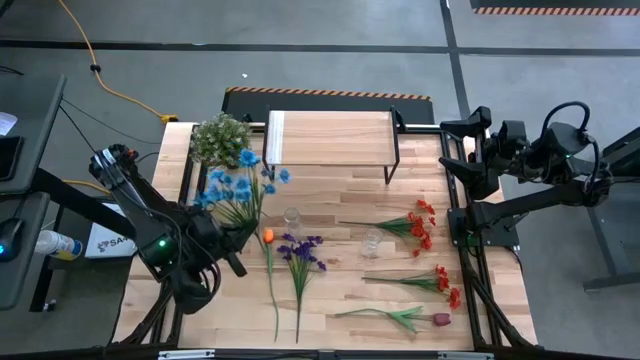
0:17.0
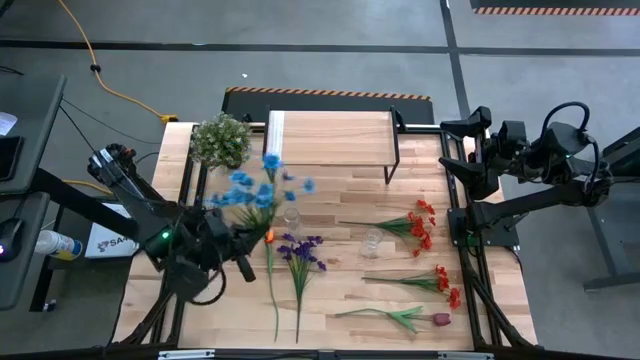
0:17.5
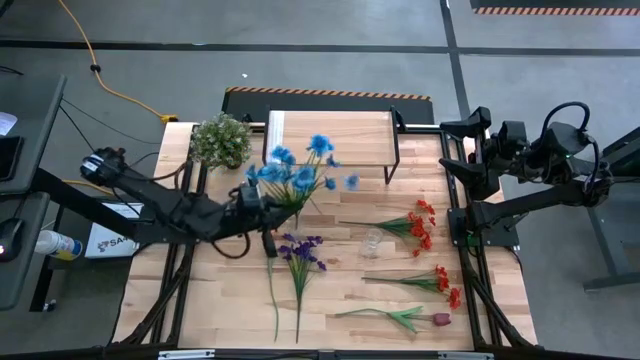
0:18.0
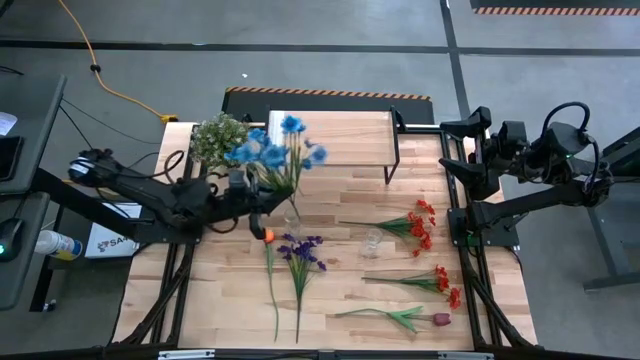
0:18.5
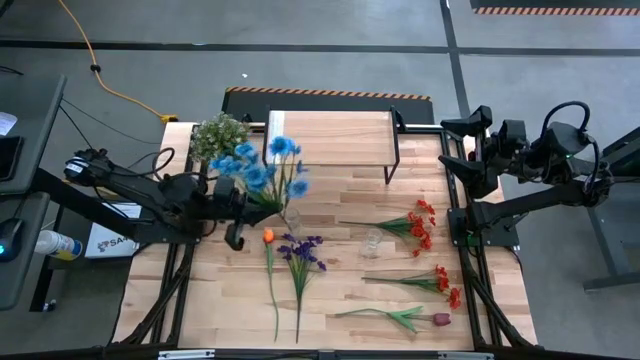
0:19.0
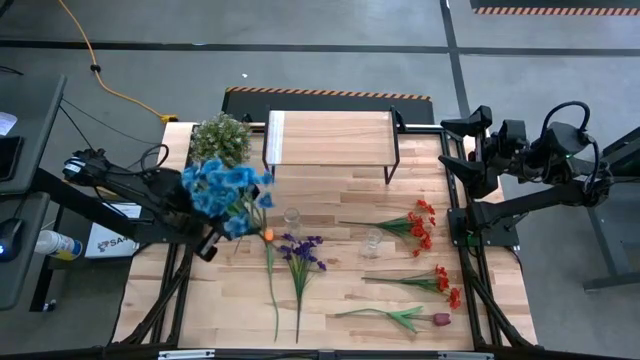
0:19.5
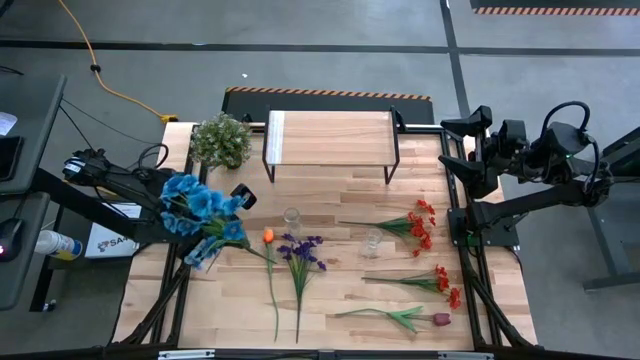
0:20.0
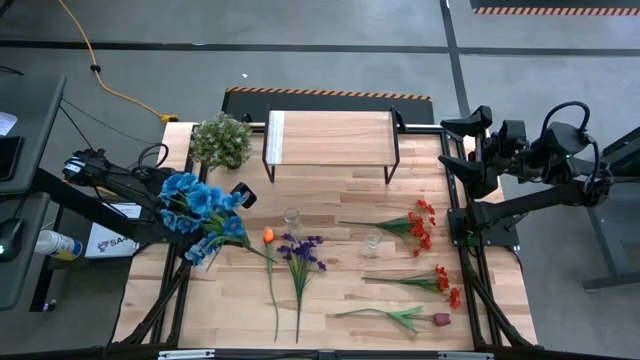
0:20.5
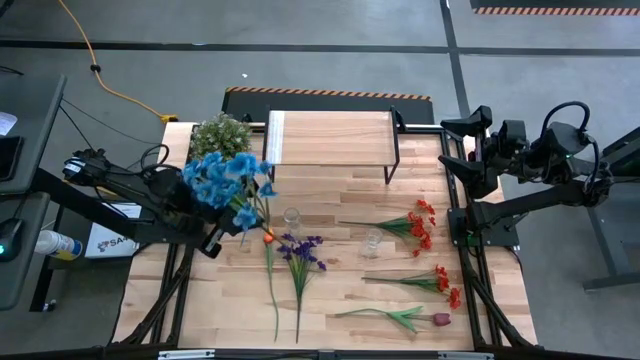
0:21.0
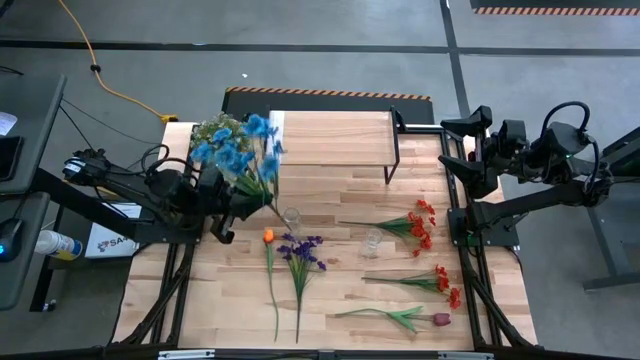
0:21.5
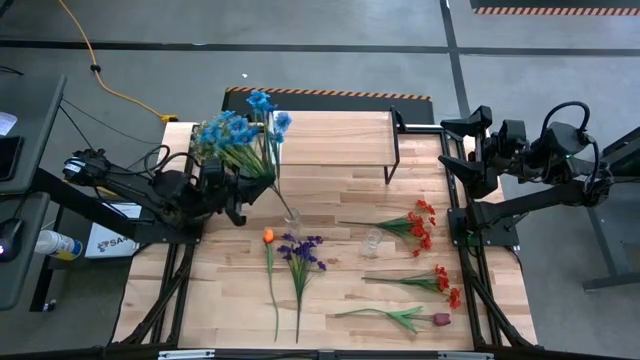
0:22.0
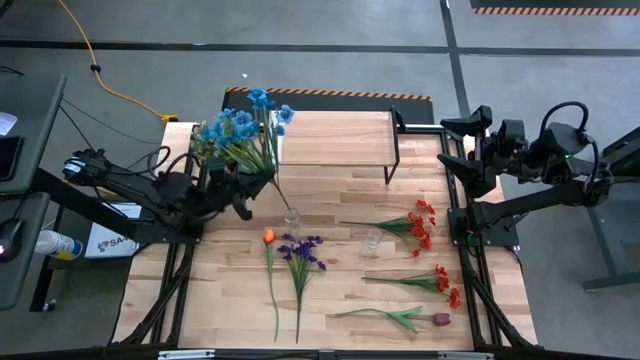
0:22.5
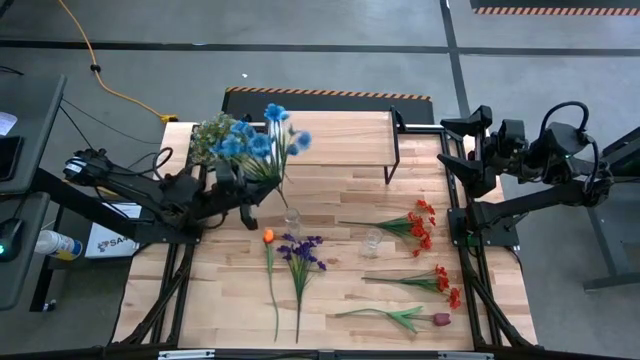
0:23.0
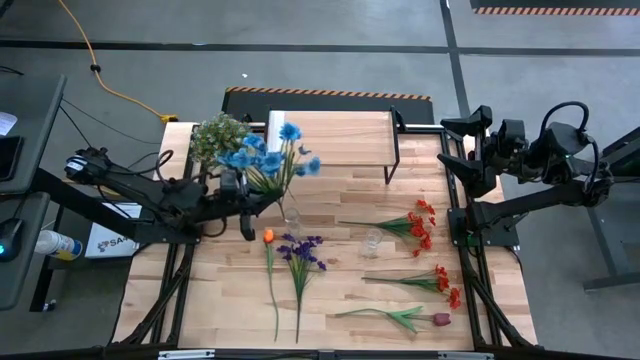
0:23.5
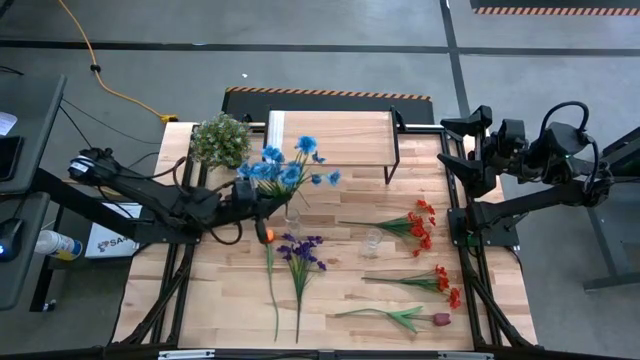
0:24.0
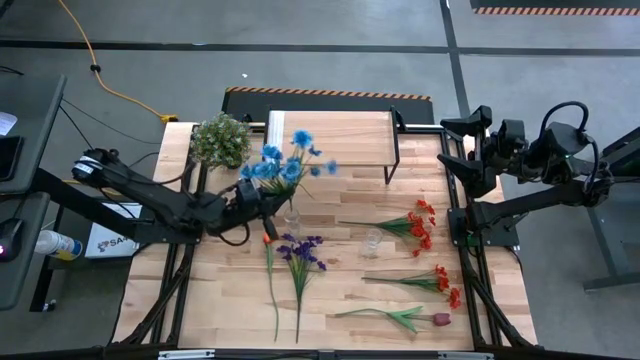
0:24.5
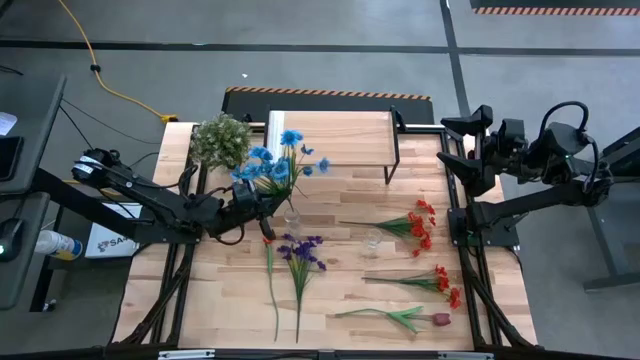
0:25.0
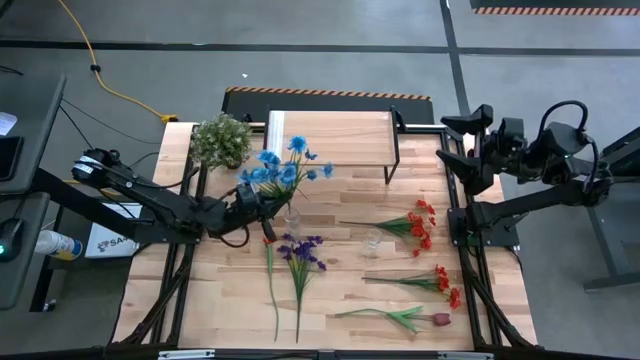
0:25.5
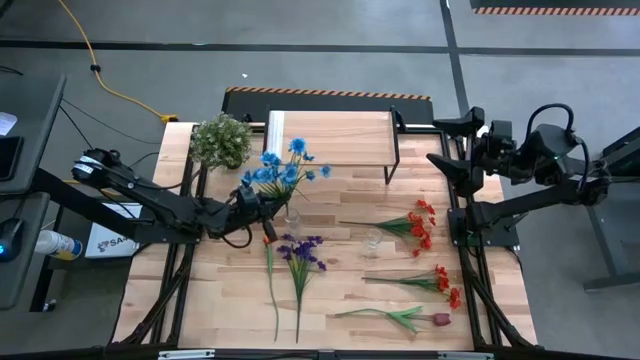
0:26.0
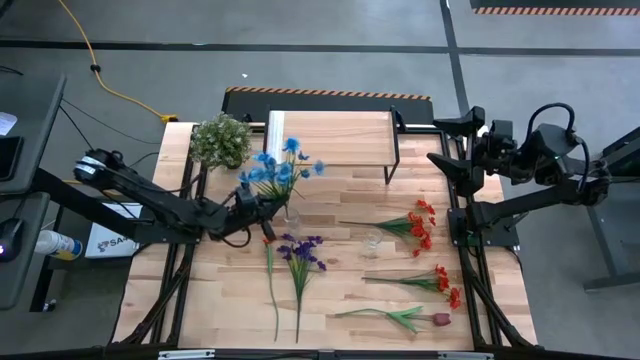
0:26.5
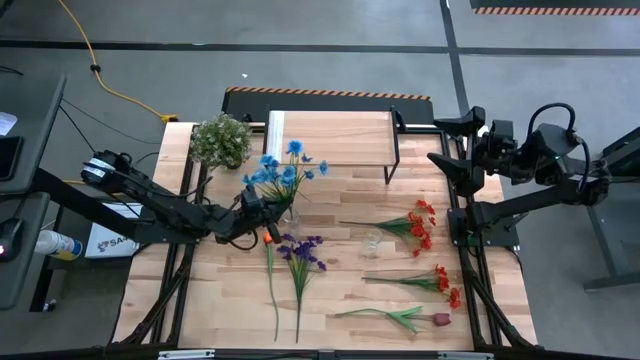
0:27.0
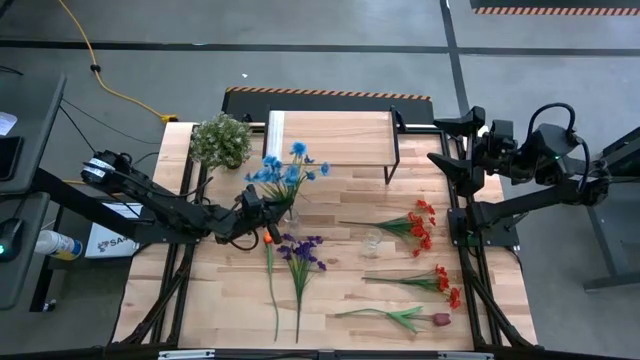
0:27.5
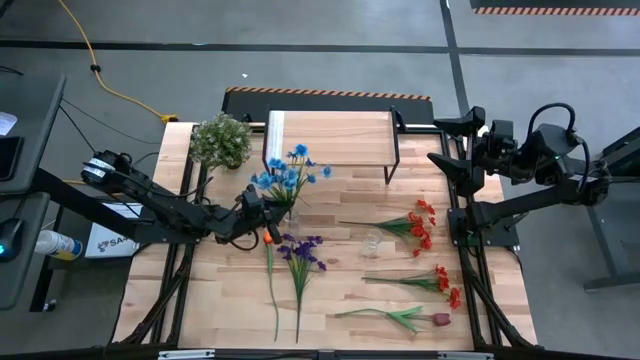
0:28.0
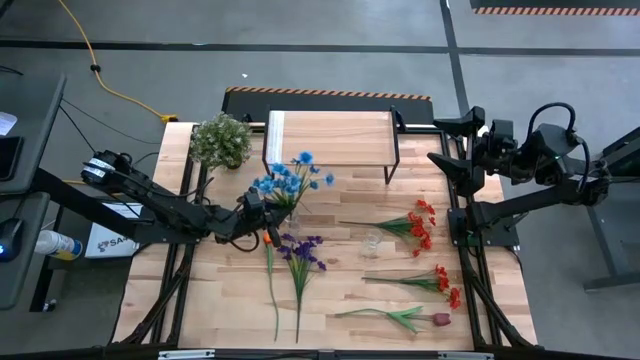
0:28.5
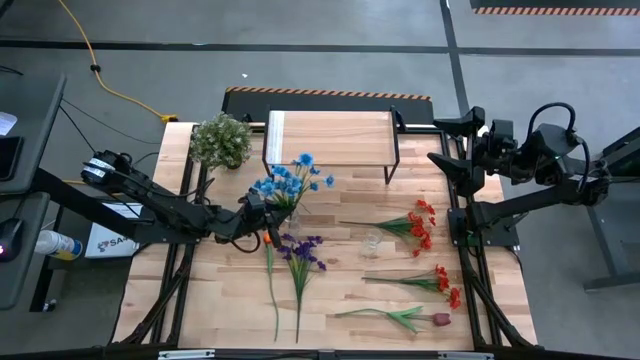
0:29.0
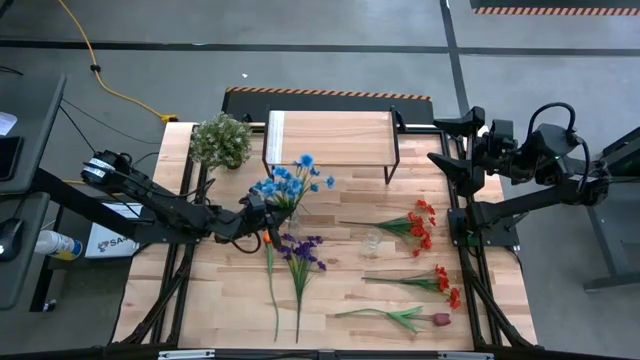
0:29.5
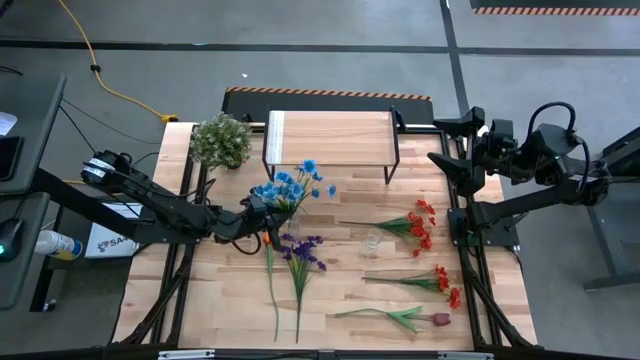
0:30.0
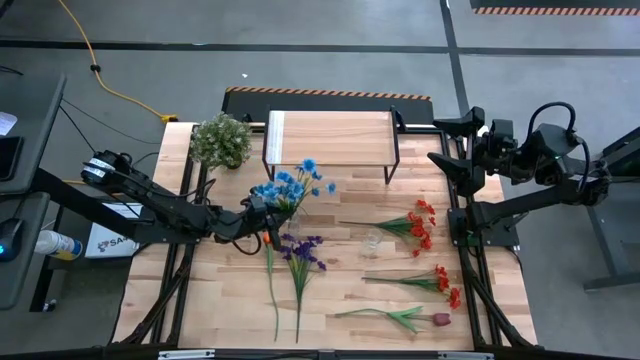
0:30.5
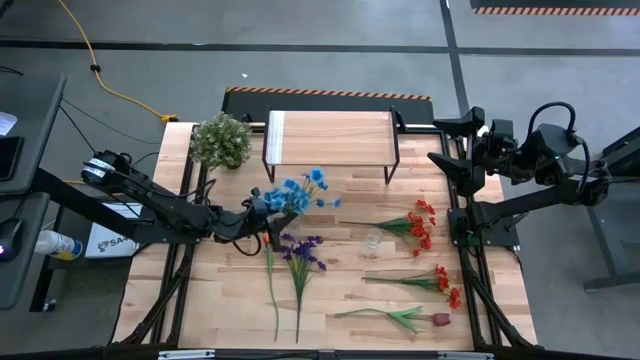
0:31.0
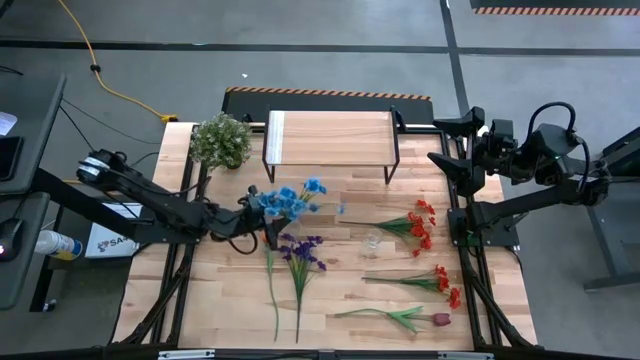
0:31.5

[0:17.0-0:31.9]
Task: Pick and place flowers into a vace then onto a shelf
Put the blue flowers into the left transparent vase

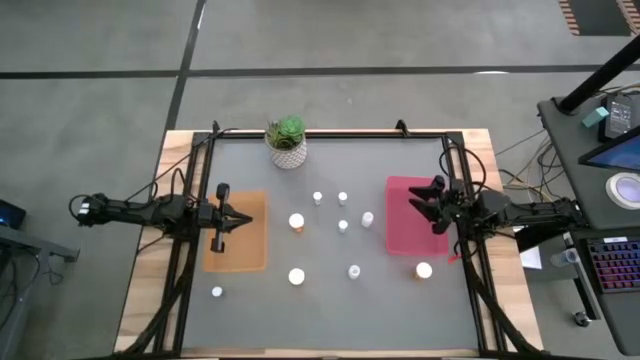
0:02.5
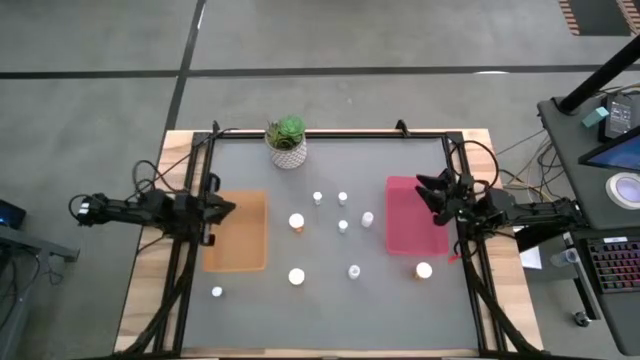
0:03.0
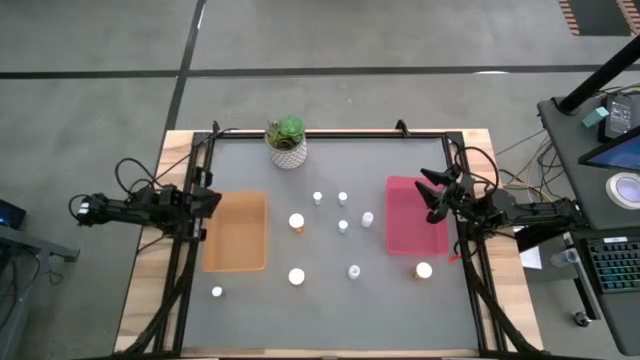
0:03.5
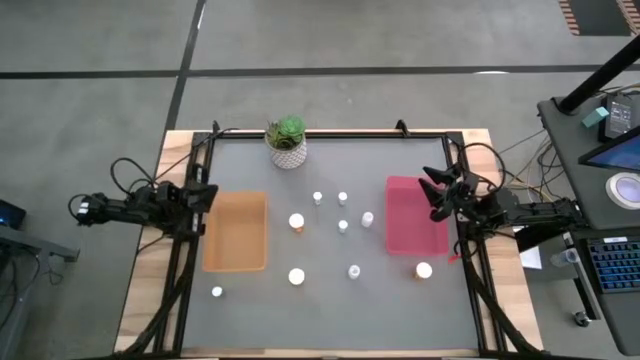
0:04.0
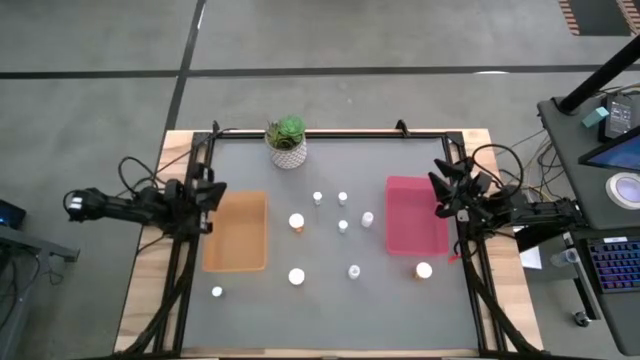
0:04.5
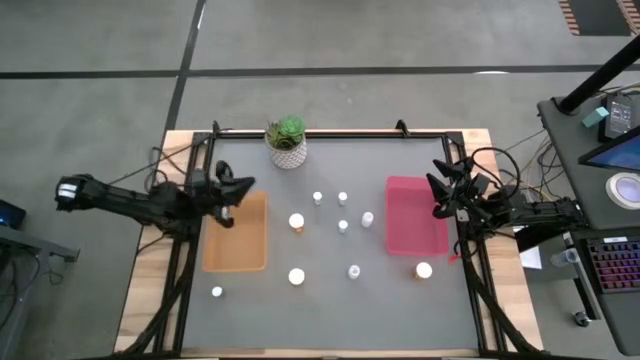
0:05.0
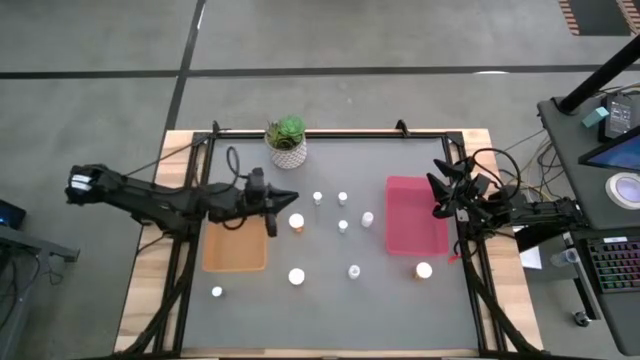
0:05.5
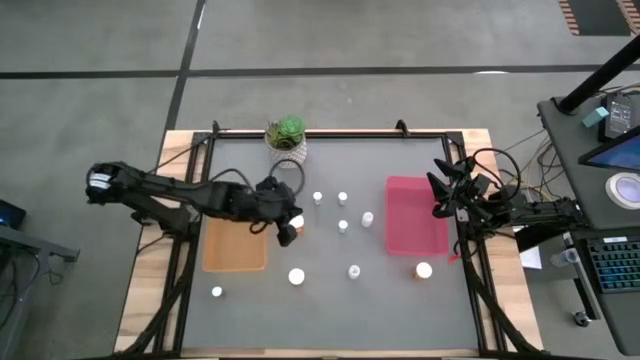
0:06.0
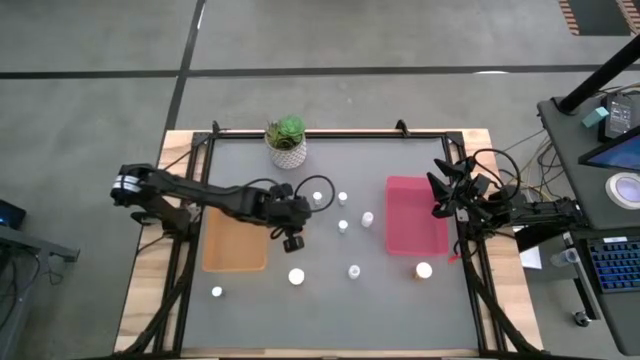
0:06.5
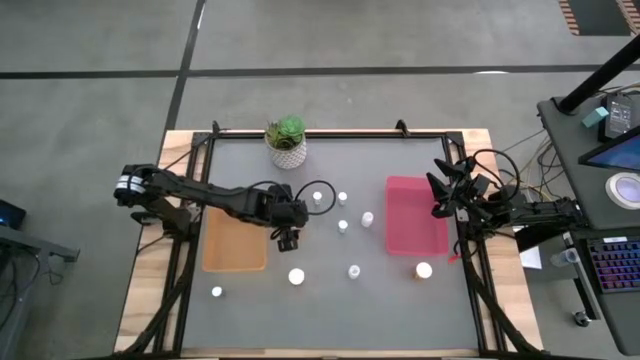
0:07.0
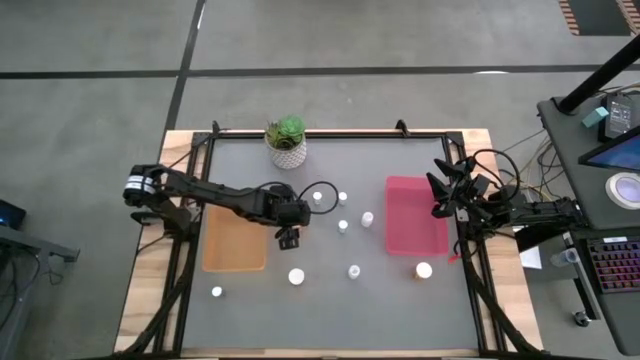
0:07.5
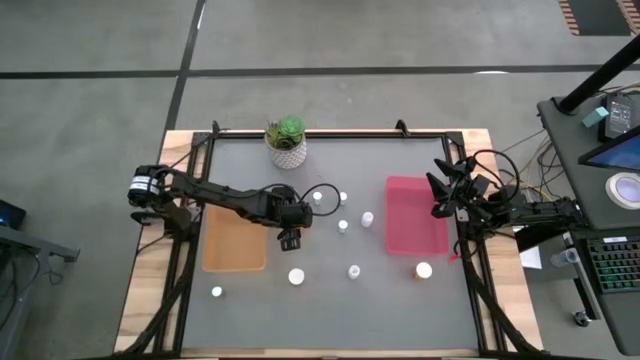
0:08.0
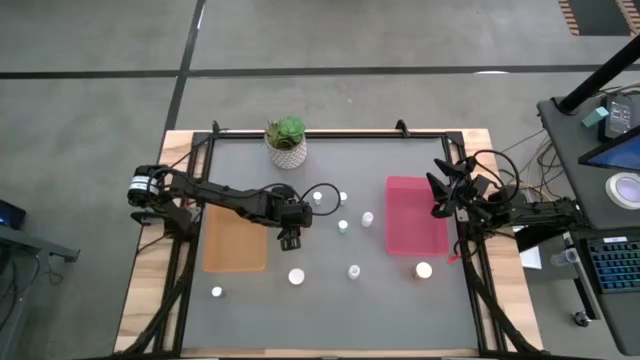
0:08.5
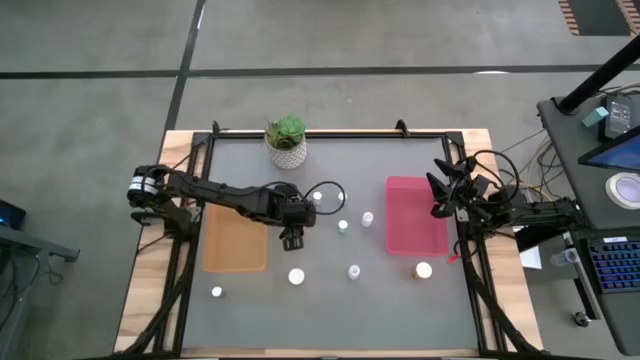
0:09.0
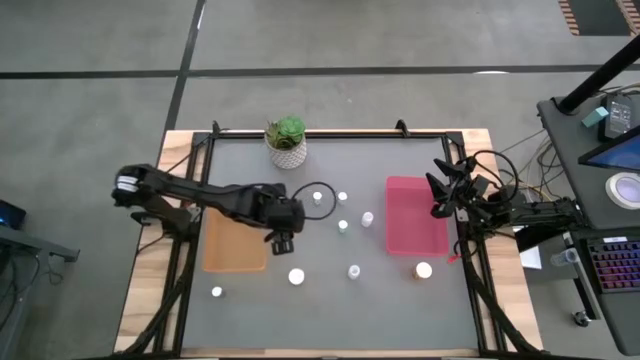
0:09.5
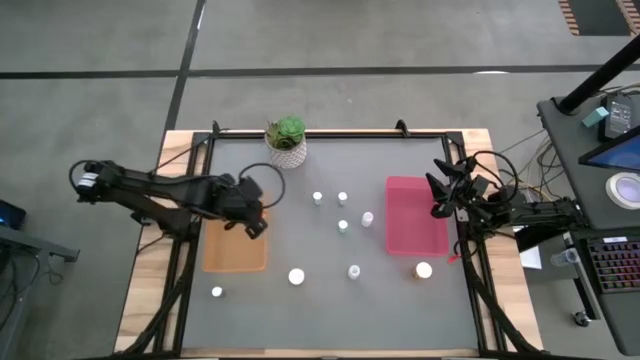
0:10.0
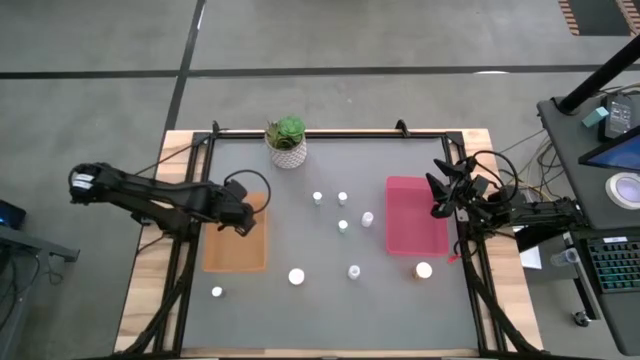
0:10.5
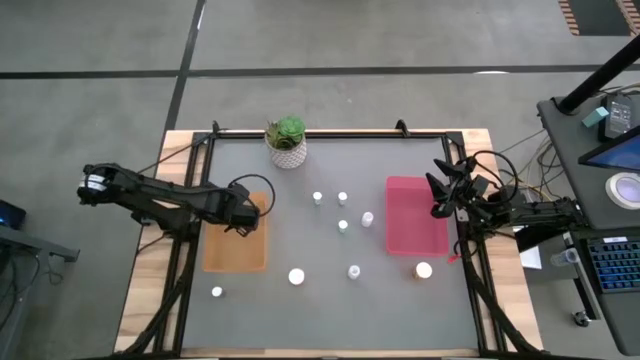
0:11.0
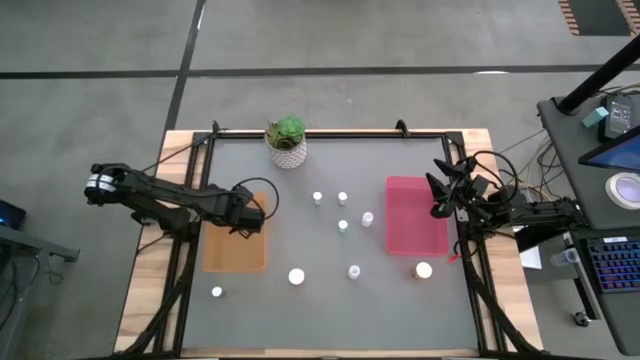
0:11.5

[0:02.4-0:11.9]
Task: Pick and place medicine bottles into bin by pill shape (circle, oval)
Put the top orange capsule bottle into the orange bin
